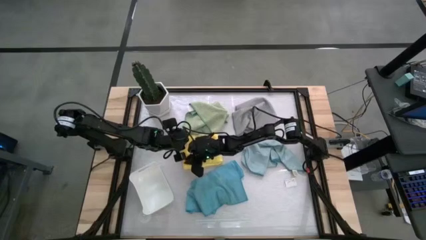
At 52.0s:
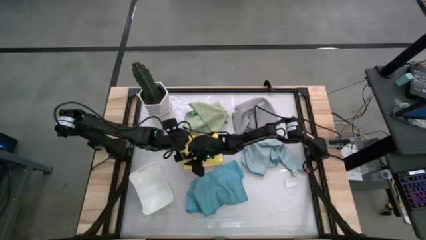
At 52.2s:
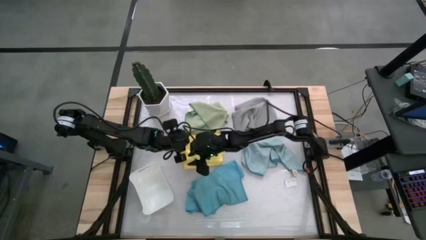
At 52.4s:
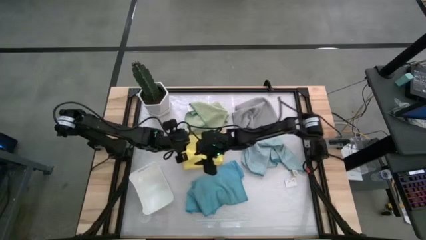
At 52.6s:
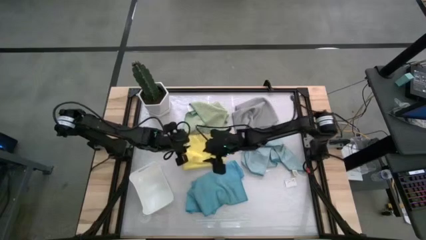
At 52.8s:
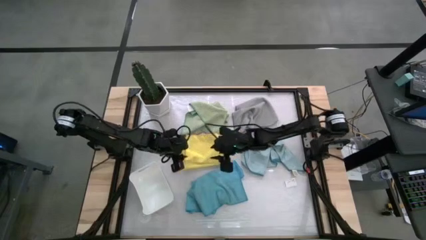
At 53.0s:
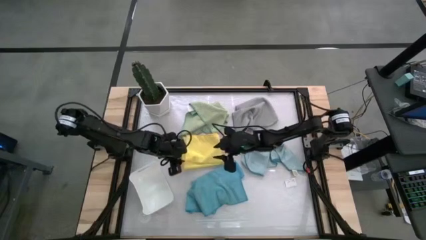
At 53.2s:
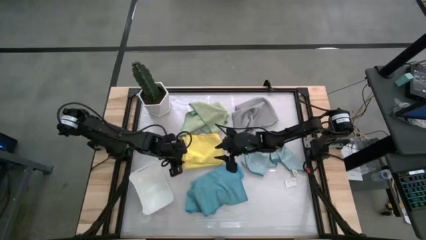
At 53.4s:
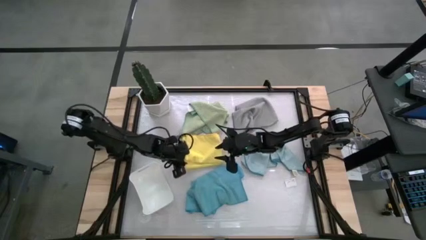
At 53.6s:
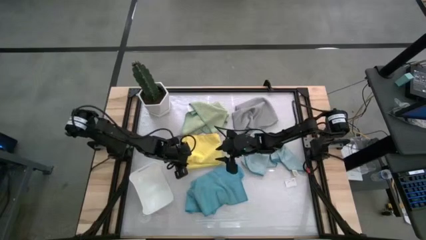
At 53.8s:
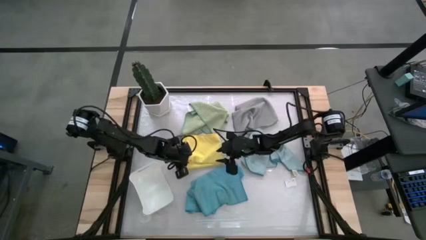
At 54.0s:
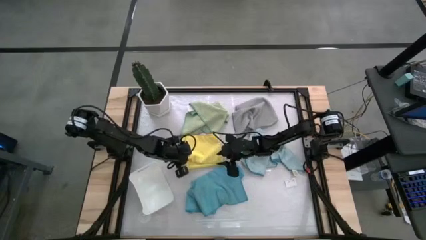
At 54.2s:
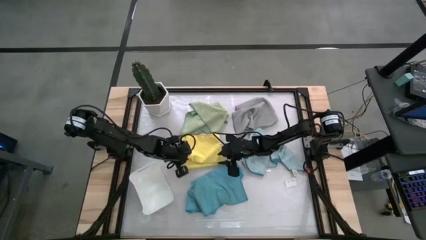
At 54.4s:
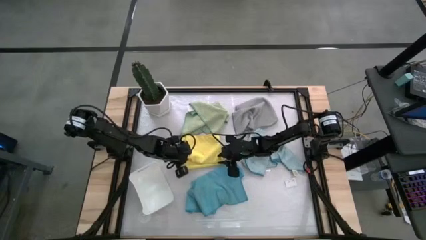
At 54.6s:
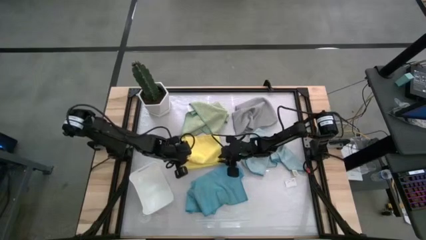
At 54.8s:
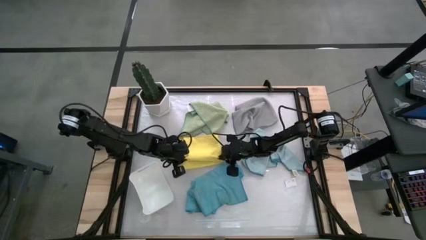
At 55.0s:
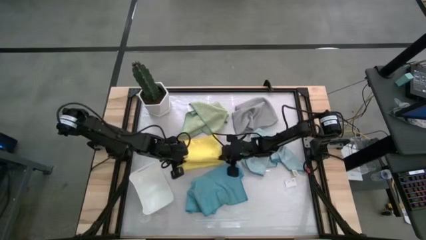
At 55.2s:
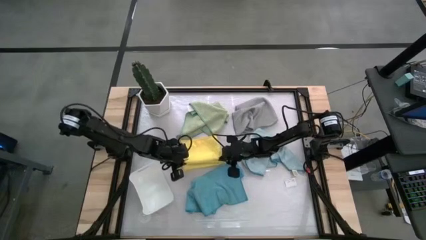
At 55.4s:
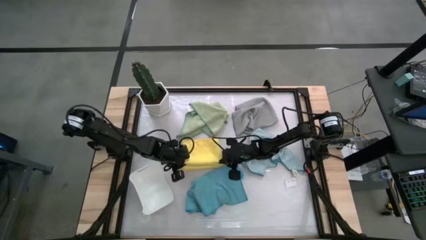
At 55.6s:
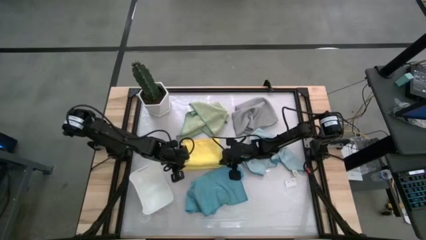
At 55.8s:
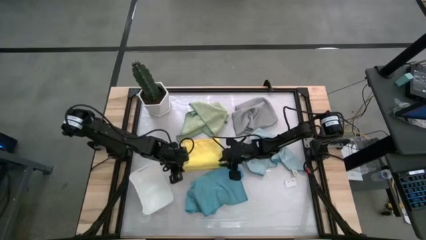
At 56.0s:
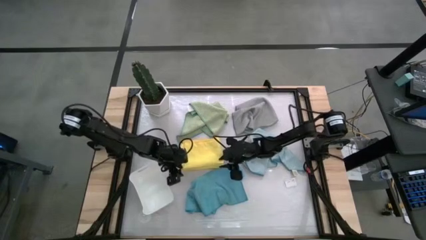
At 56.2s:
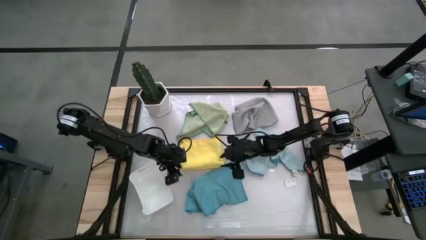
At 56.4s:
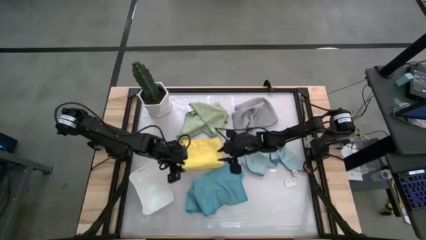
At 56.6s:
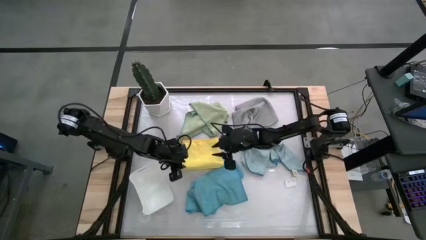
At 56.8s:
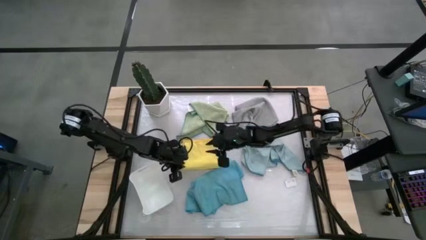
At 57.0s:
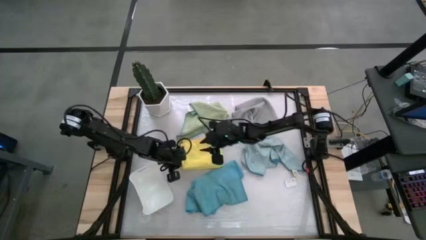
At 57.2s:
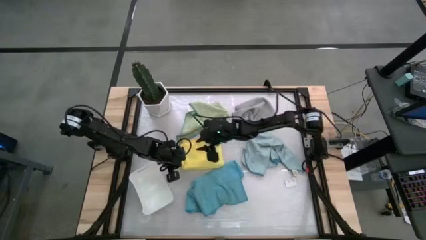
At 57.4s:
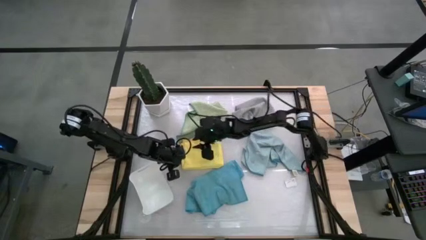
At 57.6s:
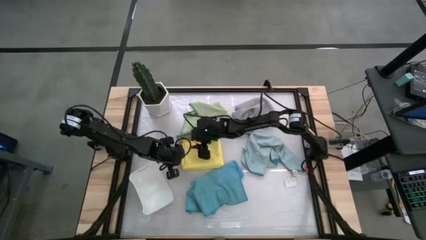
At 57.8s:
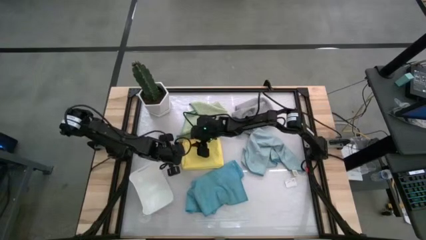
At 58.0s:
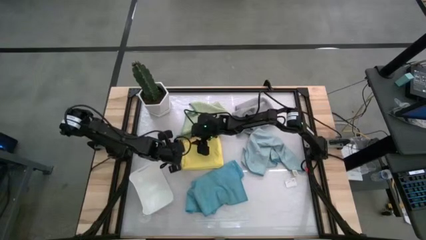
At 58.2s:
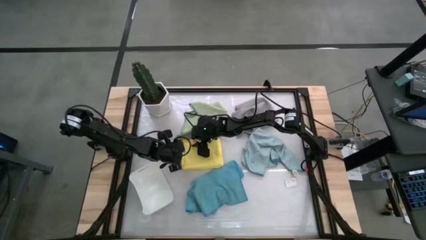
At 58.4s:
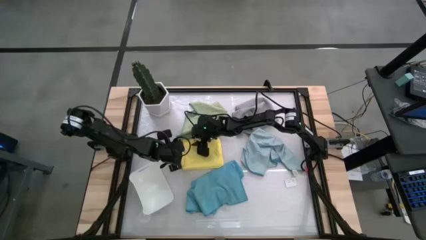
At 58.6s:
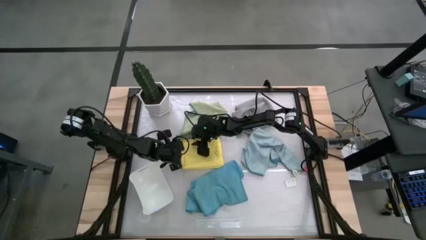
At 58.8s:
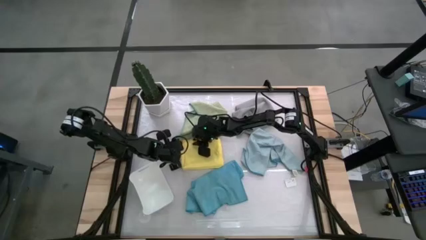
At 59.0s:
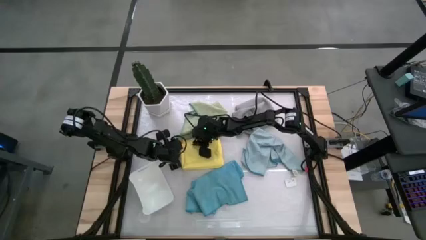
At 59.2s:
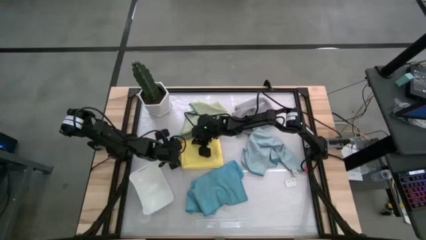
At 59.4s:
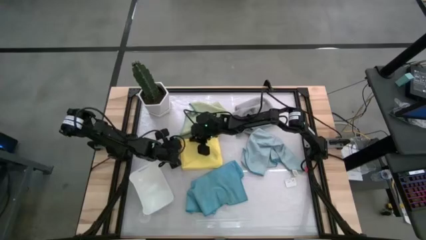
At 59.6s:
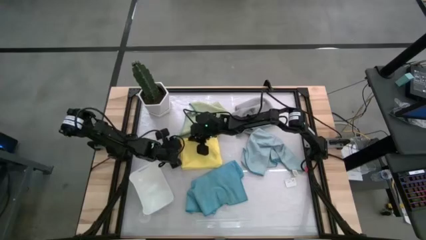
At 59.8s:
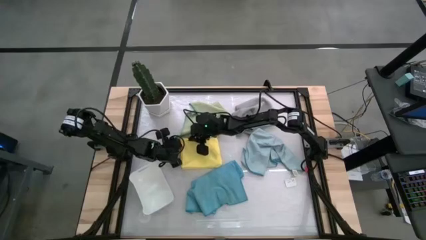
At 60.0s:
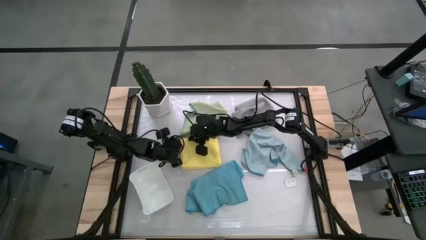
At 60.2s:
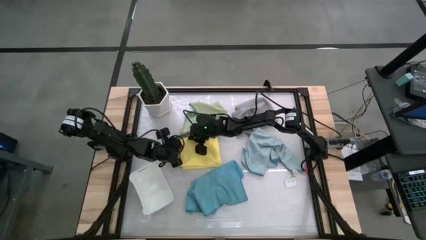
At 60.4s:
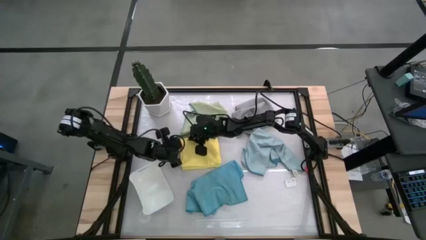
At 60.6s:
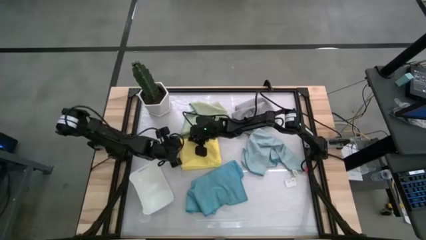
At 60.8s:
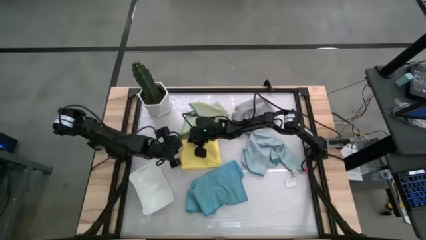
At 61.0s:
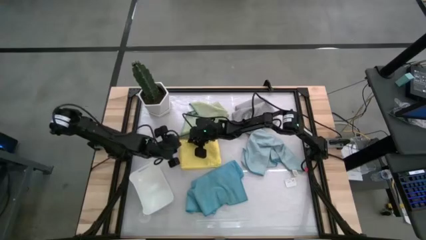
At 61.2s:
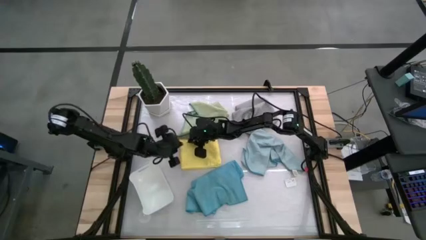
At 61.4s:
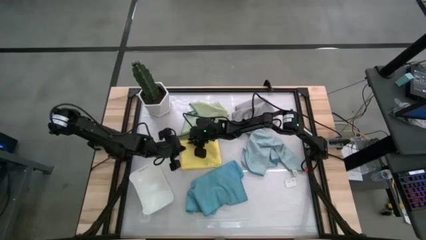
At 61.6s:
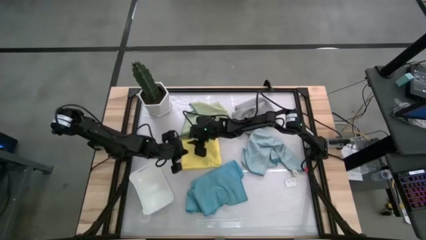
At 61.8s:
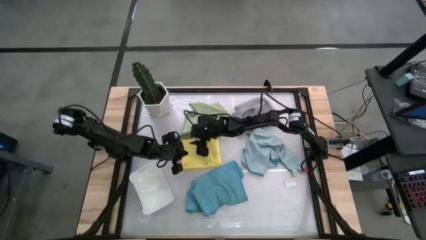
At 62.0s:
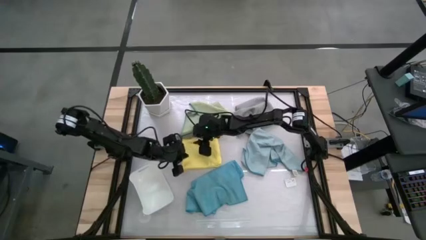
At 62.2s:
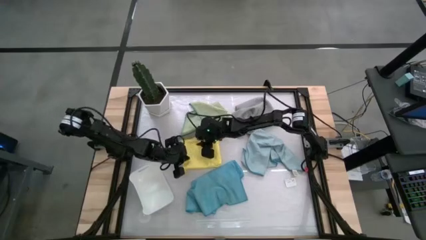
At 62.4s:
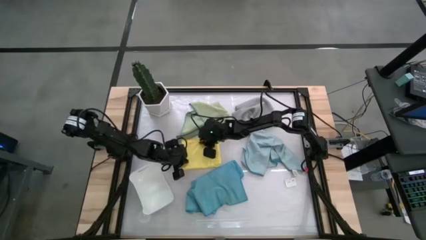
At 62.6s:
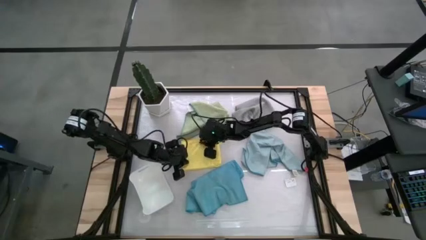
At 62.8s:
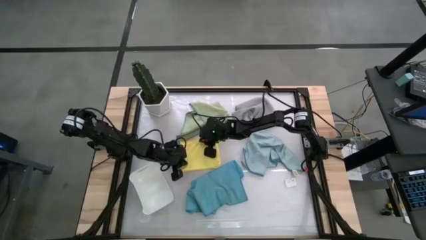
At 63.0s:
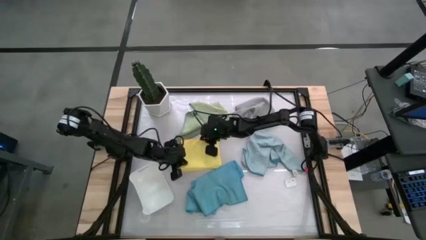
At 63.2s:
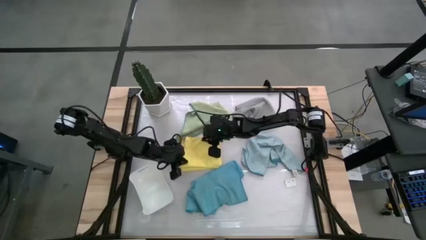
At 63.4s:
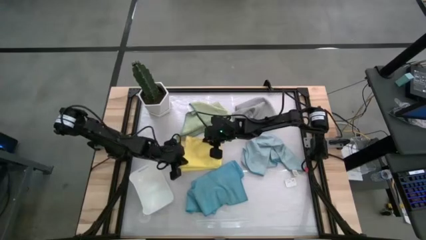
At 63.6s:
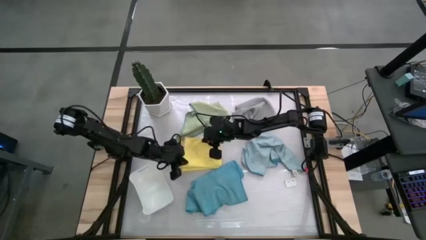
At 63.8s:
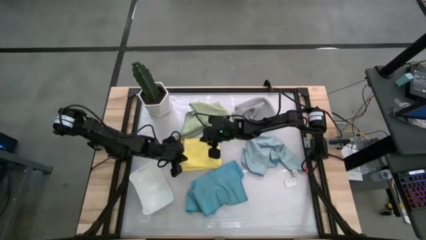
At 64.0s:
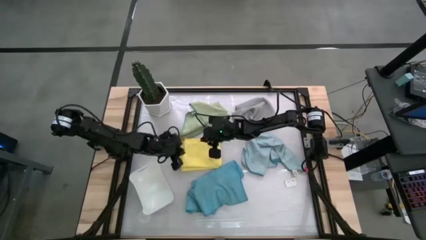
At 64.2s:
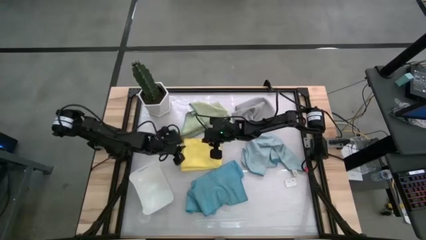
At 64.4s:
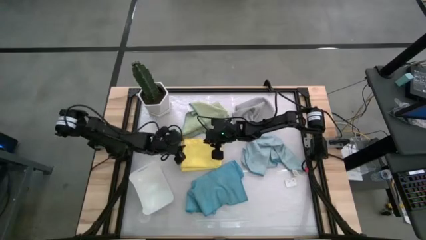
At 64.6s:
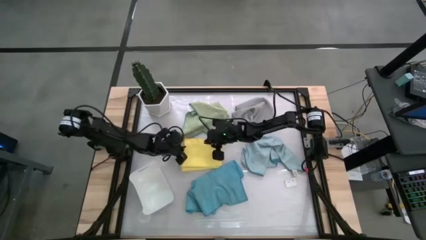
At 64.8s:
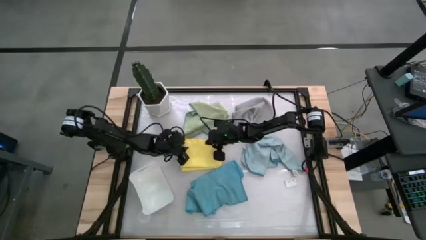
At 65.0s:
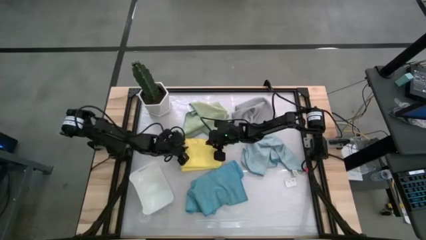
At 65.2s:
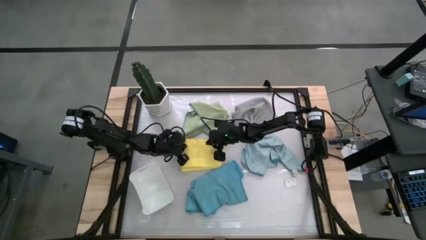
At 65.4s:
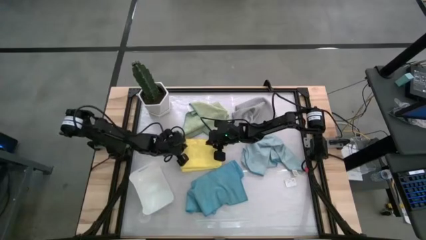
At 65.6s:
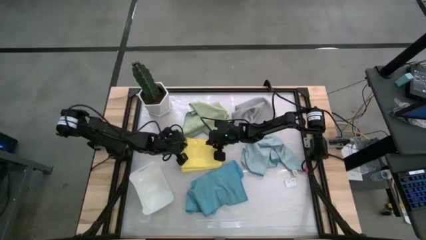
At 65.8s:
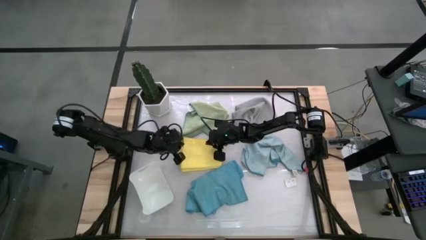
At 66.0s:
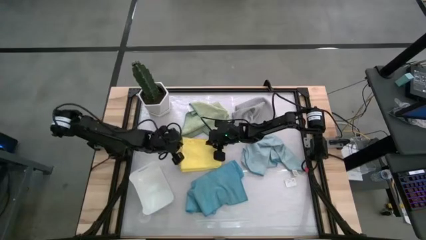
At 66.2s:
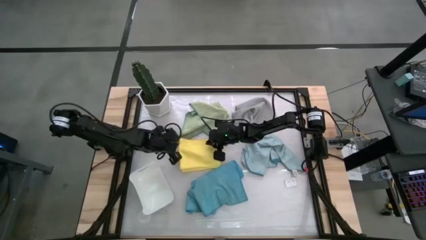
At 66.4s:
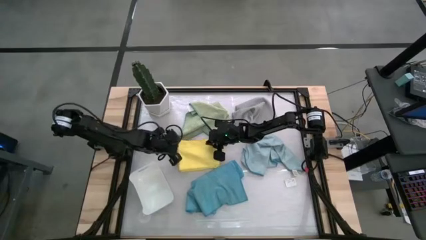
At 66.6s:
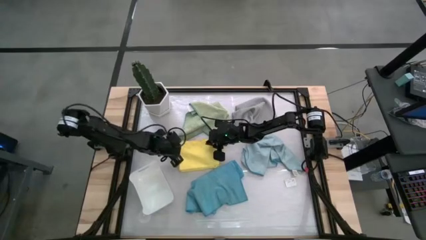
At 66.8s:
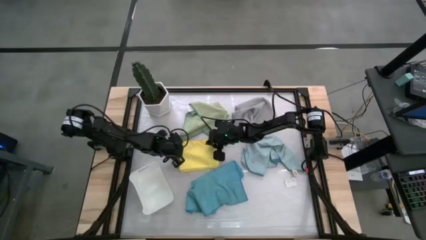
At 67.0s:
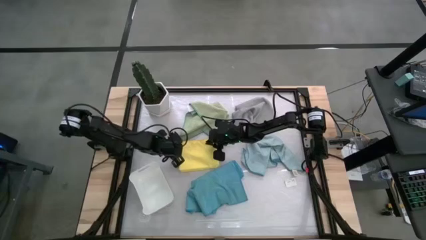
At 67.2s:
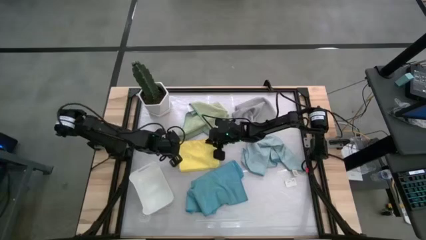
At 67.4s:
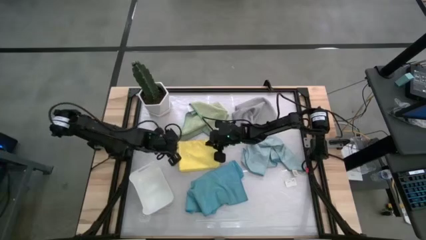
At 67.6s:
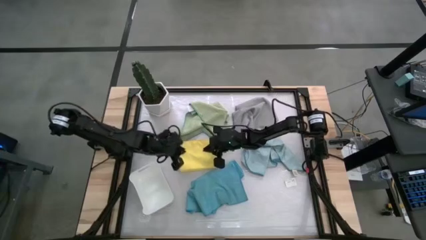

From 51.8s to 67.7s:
Task: Fold microfiber towels
Fold the yellow microfiber towel
